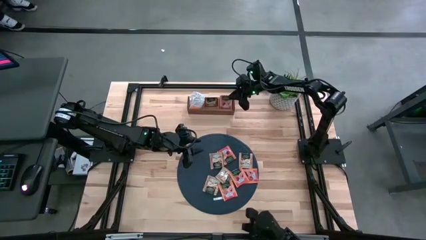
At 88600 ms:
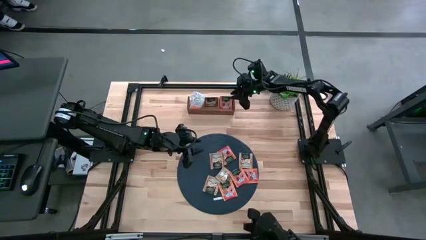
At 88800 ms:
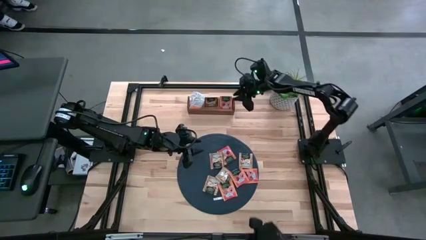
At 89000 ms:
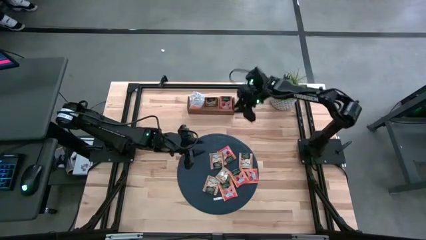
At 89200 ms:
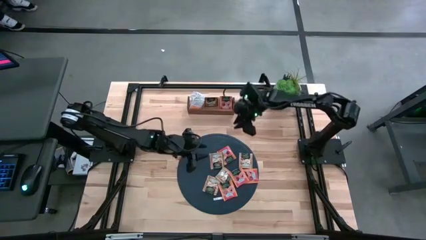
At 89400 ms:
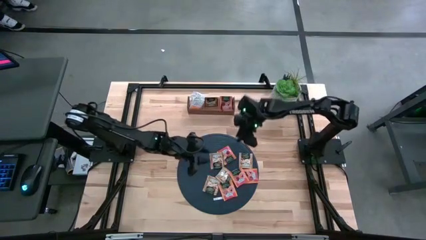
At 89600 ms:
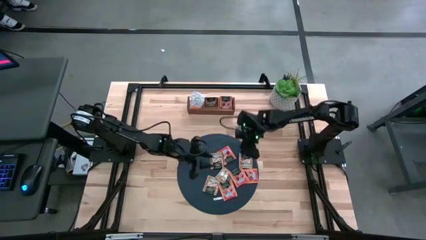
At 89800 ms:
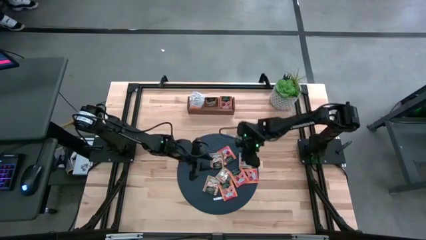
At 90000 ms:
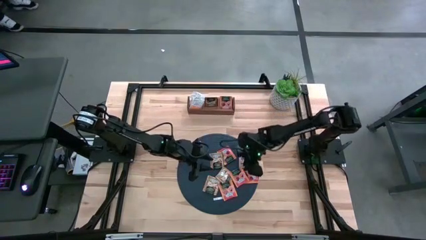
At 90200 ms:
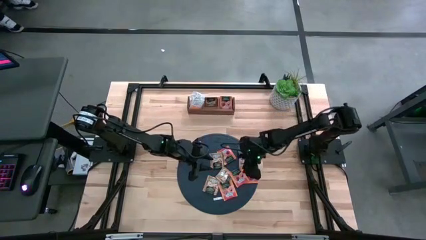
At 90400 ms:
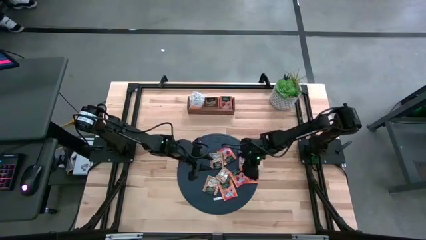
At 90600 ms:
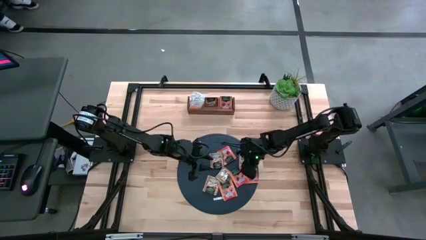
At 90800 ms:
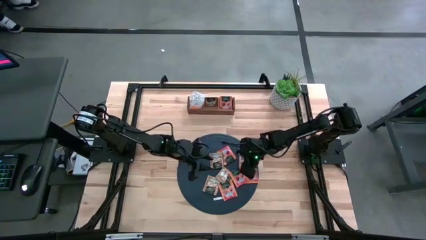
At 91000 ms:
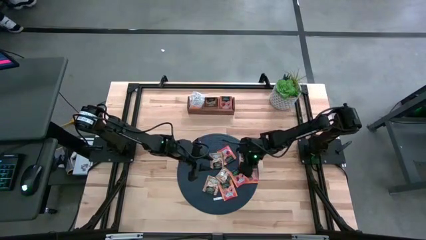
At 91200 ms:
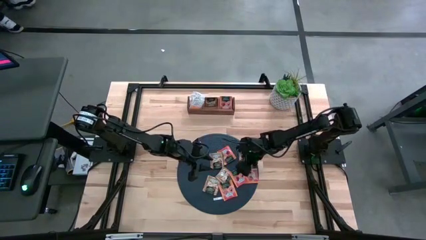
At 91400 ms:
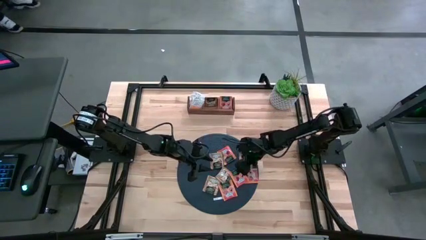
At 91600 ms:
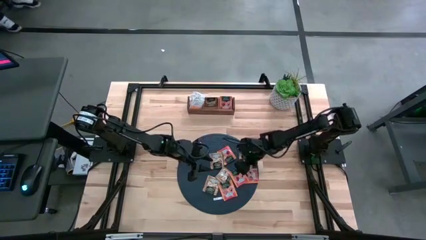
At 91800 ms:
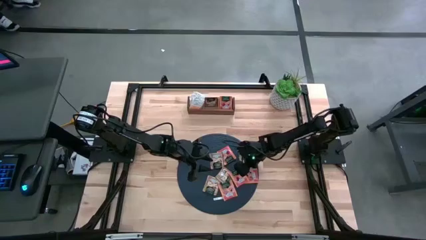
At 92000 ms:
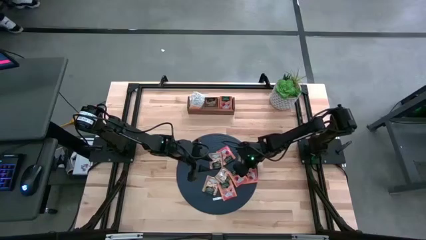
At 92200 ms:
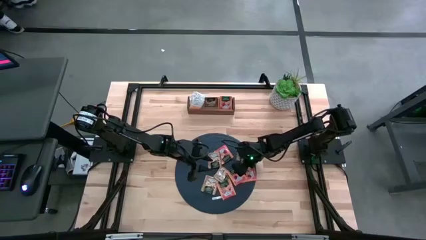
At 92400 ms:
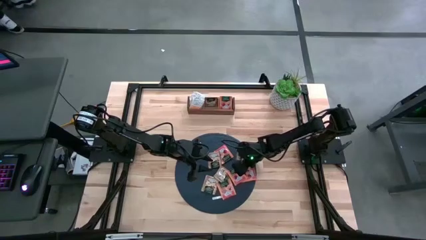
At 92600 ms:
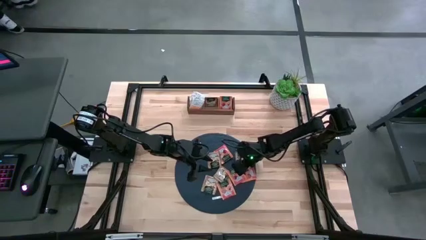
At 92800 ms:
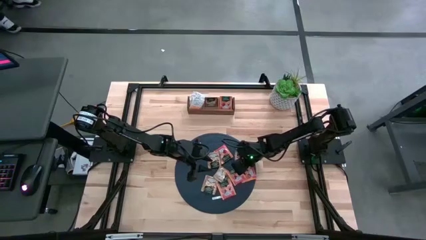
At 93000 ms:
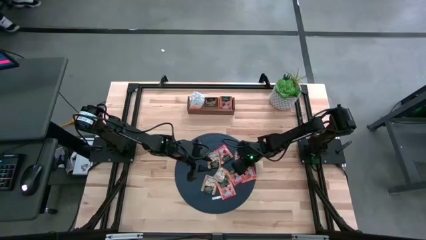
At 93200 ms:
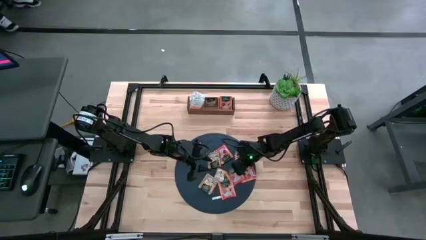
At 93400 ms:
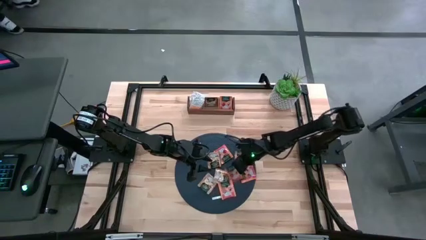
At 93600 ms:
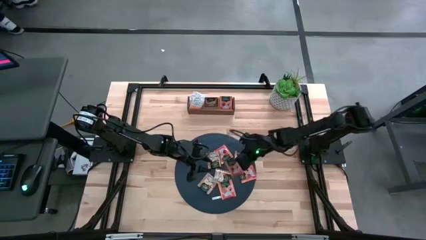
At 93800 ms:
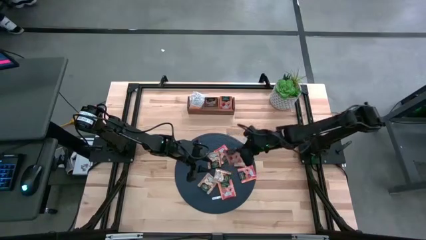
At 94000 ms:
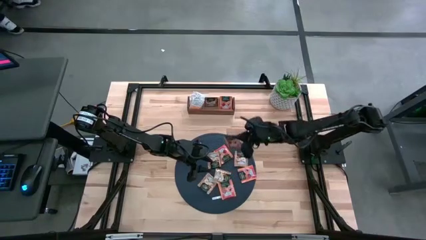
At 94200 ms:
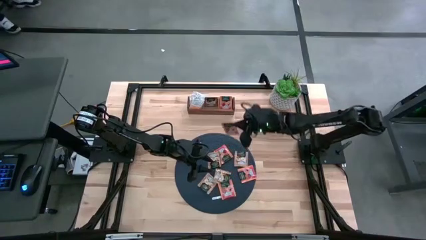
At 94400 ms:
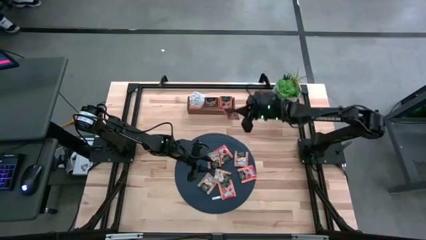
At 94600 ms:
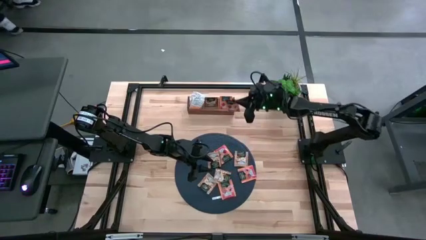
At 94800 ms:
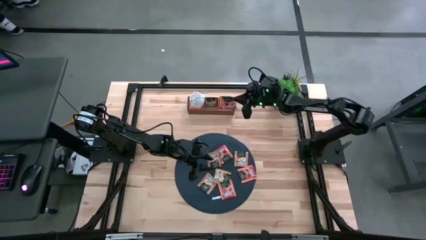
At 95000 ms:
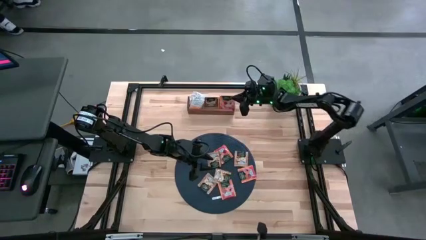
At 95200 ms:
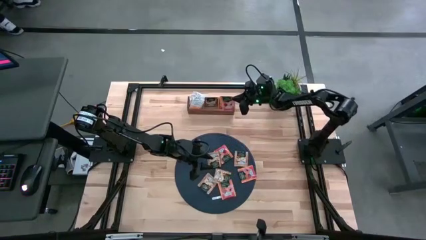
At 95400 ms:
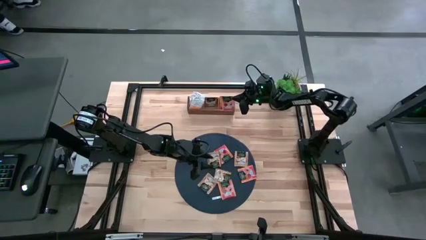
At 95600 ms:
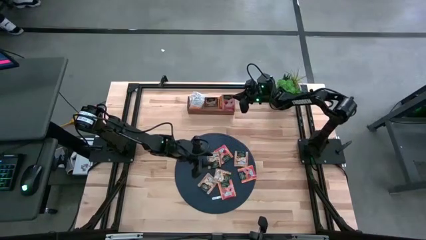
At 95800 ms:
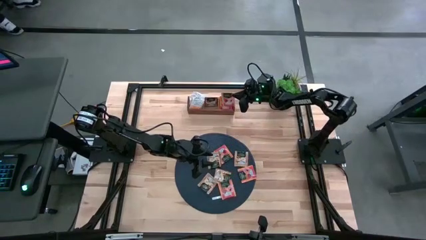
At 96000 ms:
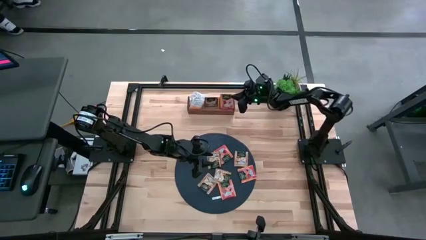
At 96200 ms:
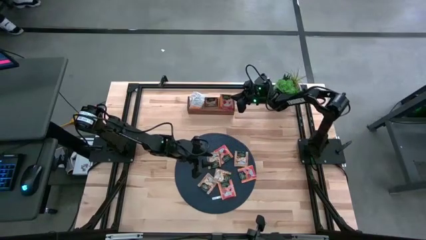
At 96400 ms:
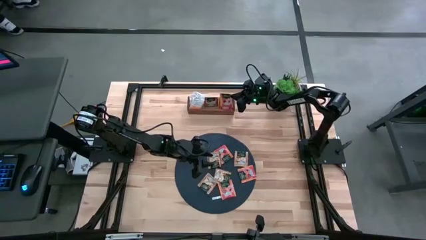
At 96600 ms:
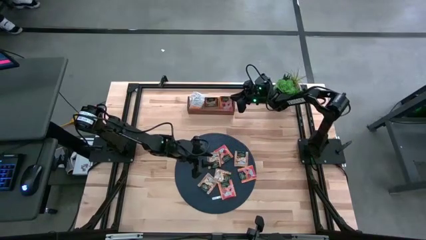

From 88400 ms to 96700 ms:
Task: Pick & Place Tea
Put the orange tea bag into the right section of the wooden organizer

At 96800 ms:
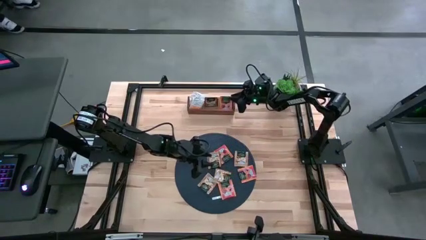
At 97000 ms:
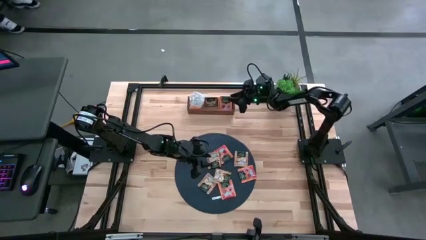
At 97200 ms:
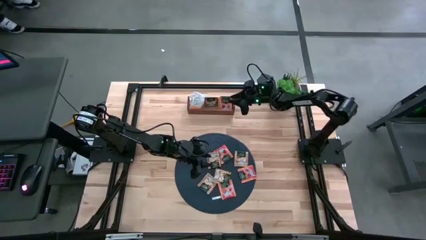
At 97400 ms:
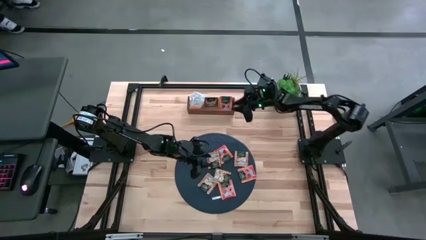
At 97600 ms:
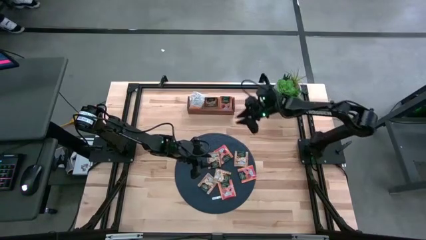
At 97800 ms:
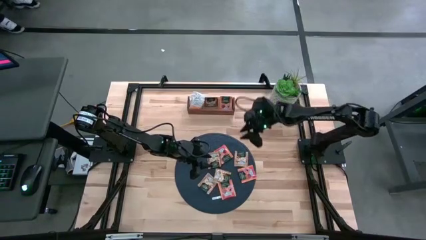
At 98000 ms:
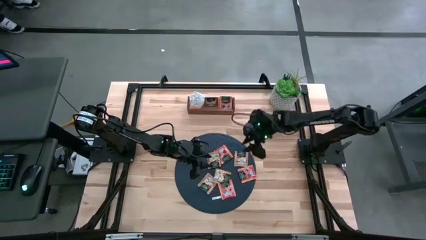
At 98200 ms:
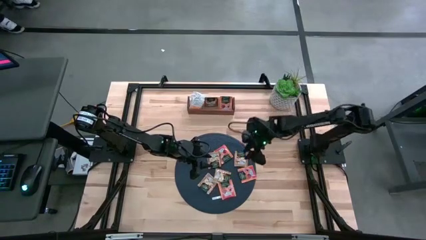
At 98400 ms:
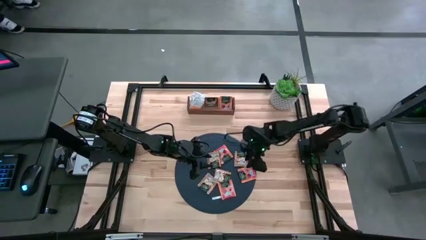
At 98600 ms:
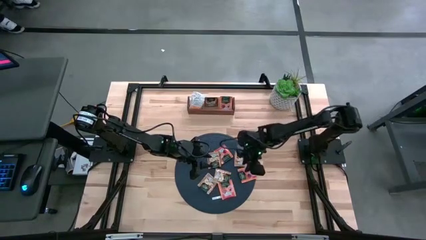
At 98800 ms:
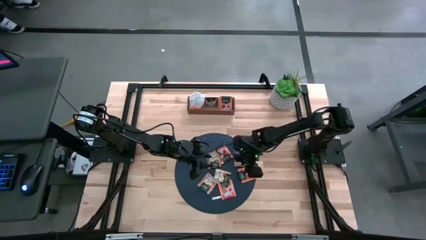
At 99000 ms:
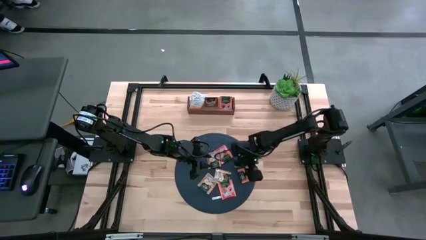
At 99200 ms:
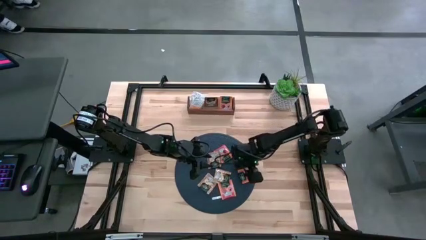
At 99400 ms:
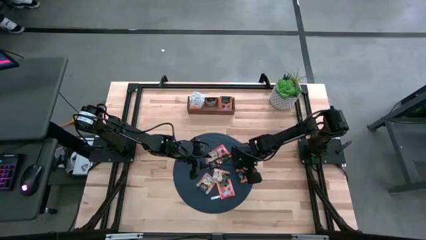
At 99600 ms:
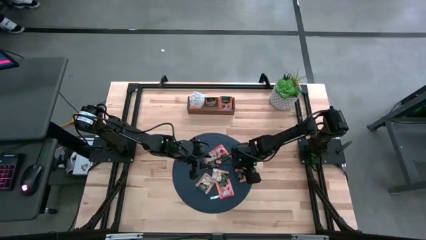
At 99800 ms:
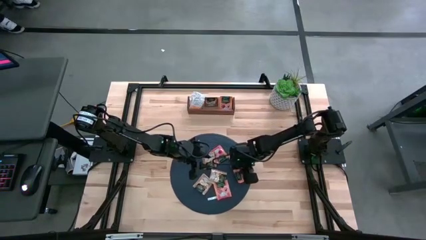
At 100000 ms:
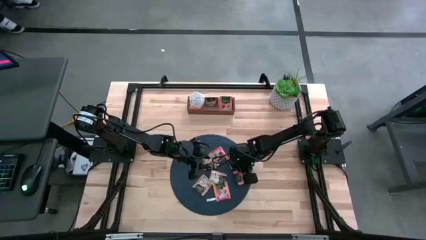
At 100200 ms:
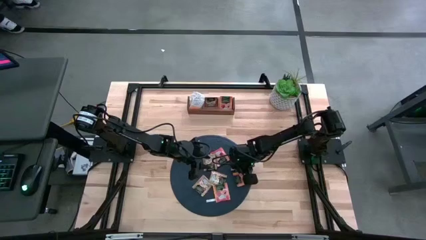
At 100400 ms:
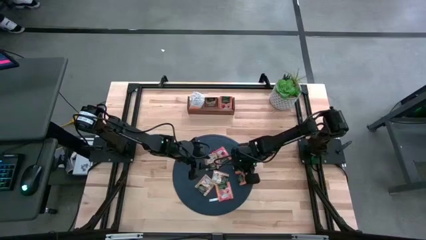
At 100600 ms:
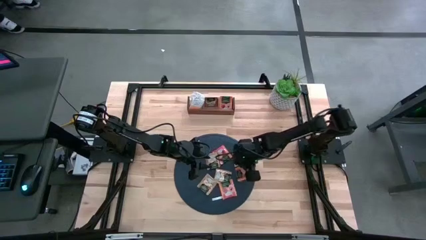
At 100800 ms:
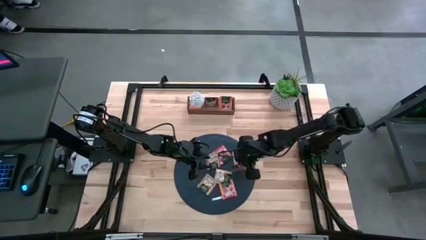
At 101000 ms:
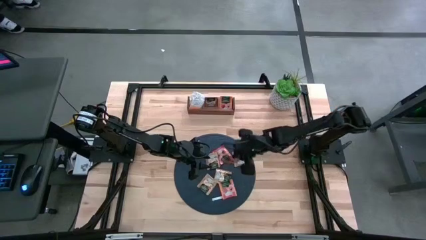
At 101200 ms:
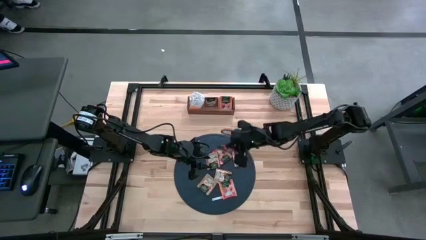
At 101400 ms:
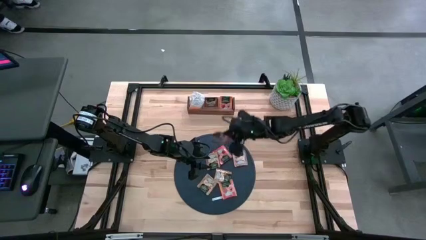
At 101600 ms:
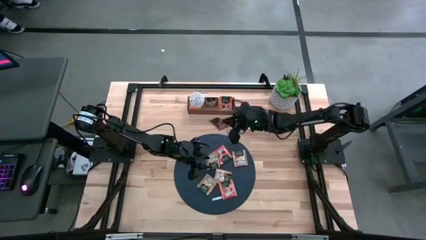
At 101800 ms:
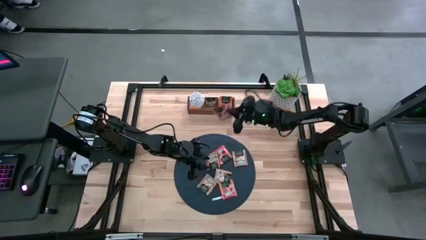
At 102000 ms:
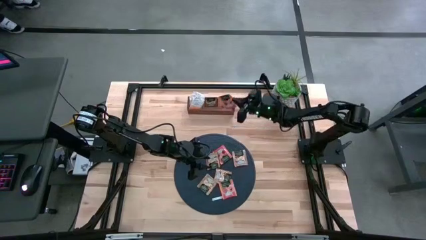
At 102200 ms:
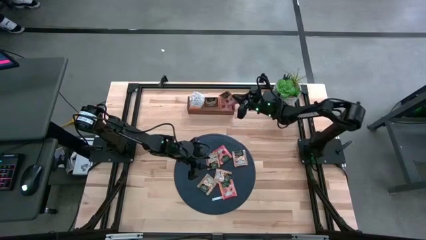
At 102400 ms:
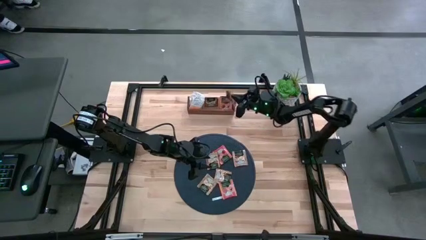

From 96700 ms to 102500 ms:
Put the orange tea bag into the right section of the wooden organizer
